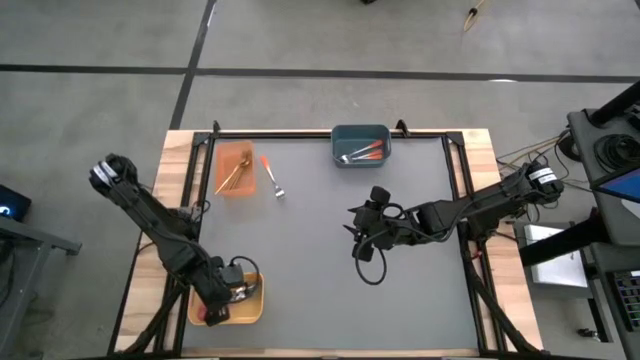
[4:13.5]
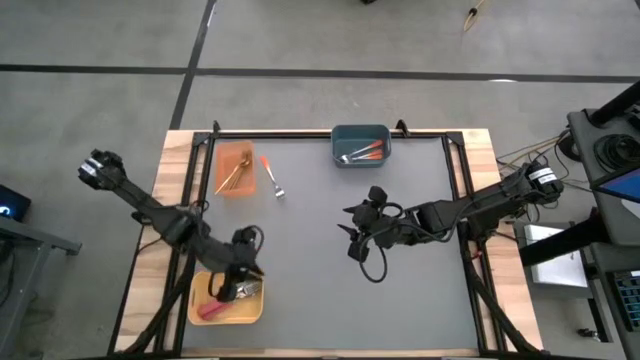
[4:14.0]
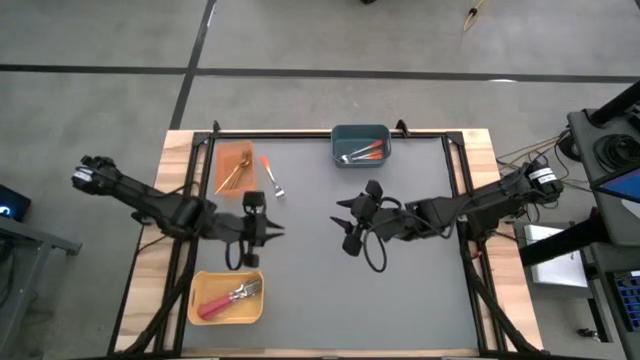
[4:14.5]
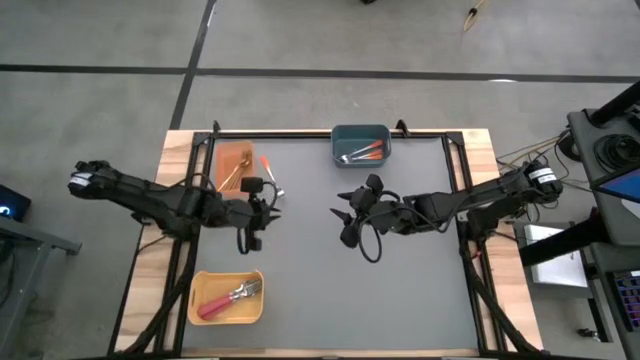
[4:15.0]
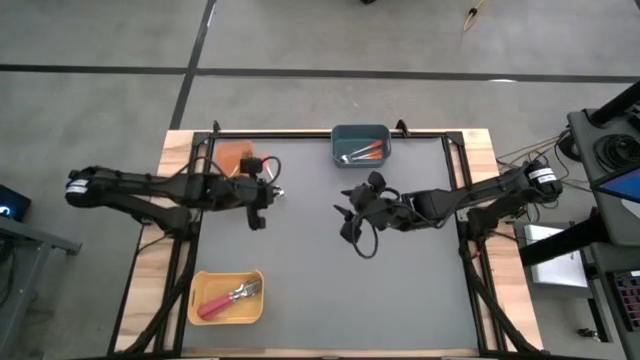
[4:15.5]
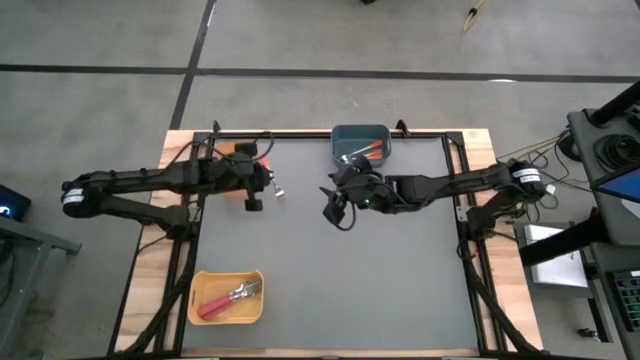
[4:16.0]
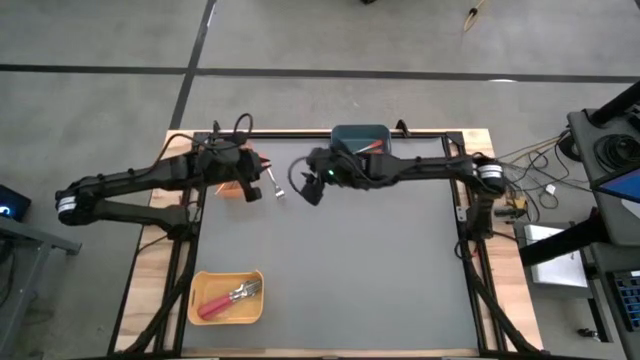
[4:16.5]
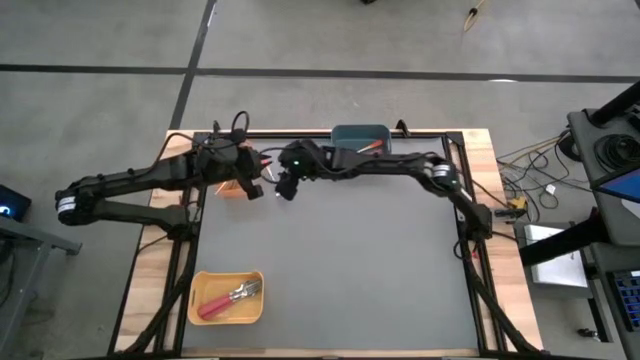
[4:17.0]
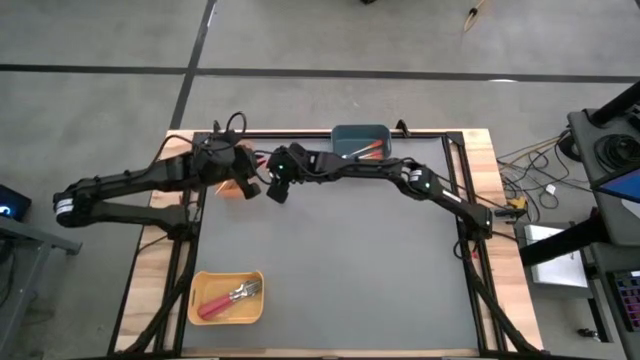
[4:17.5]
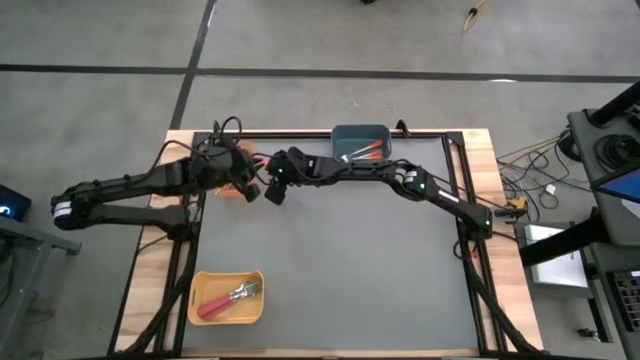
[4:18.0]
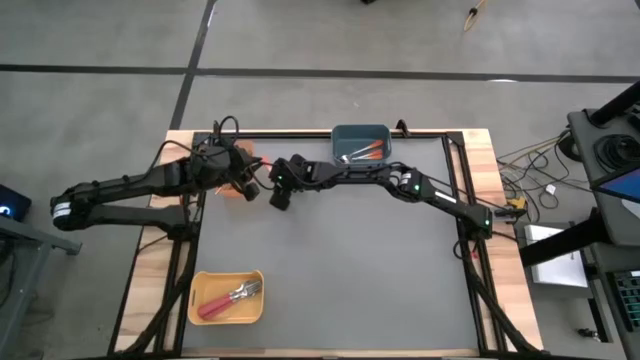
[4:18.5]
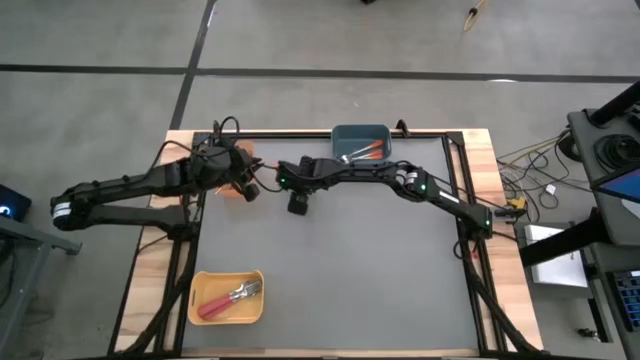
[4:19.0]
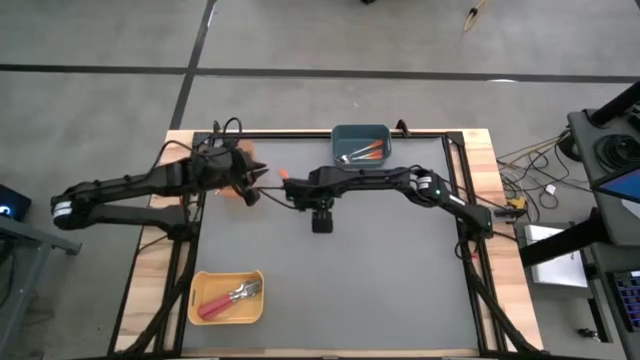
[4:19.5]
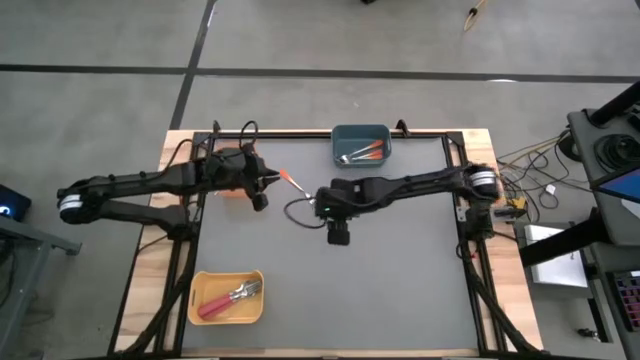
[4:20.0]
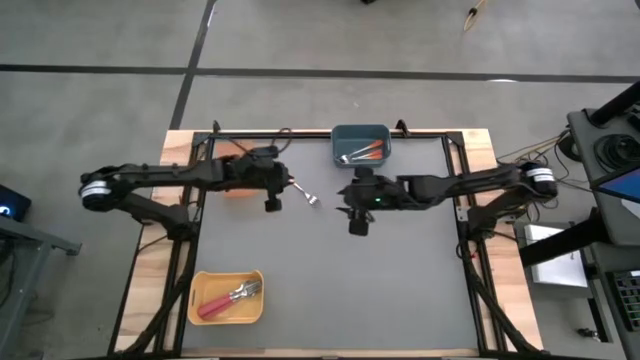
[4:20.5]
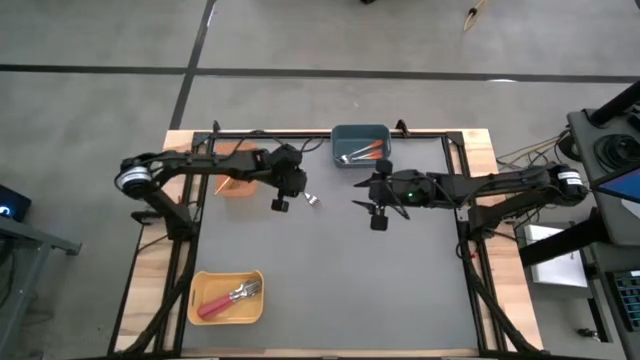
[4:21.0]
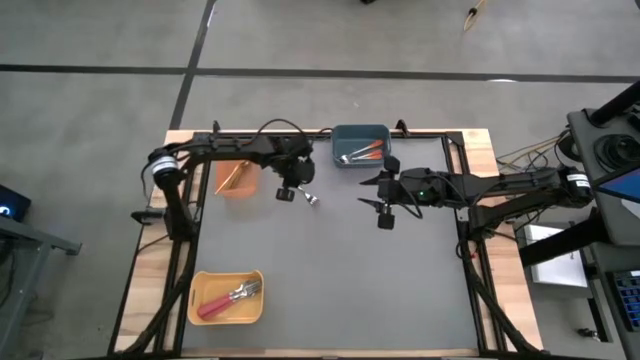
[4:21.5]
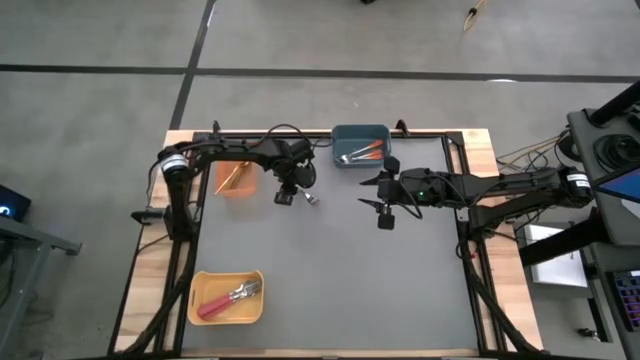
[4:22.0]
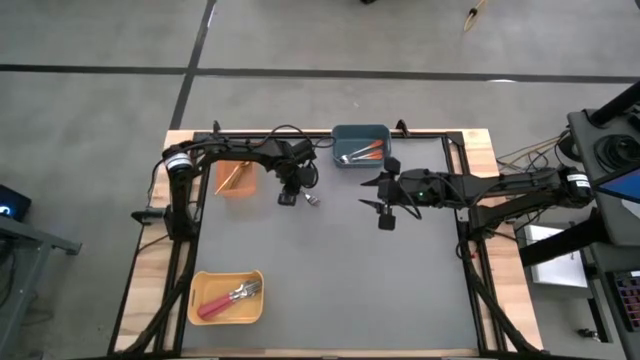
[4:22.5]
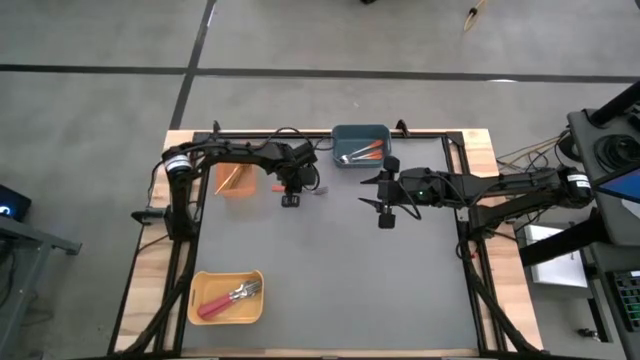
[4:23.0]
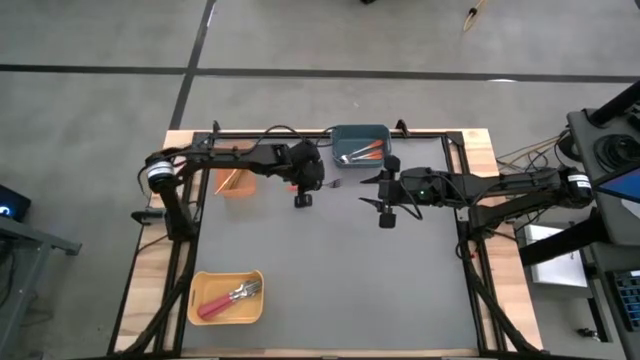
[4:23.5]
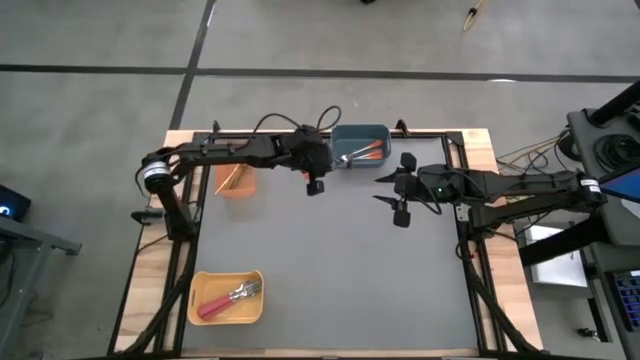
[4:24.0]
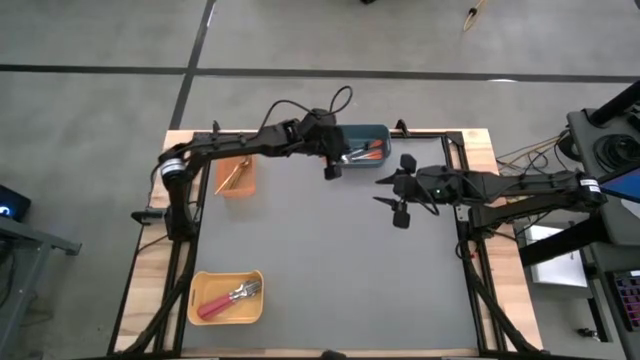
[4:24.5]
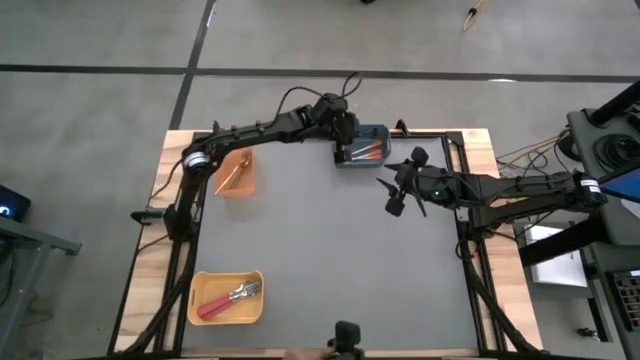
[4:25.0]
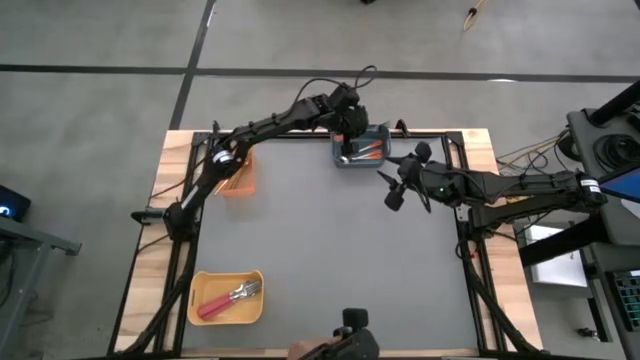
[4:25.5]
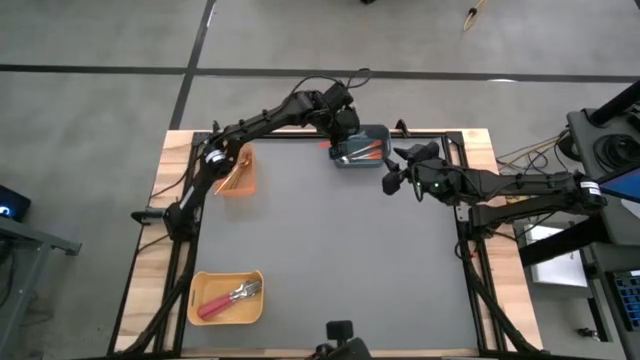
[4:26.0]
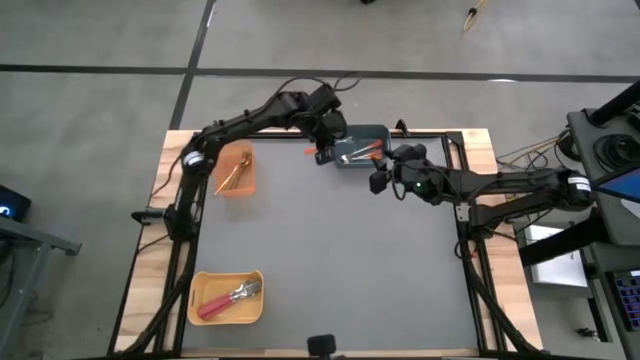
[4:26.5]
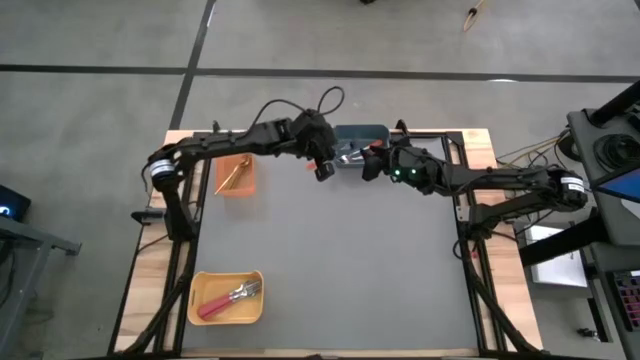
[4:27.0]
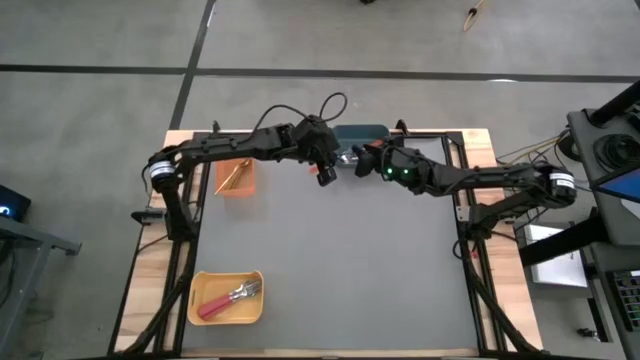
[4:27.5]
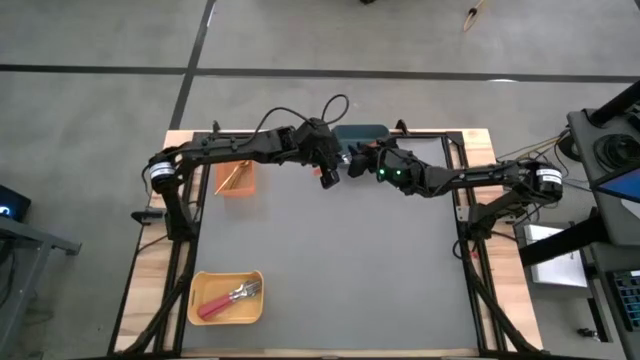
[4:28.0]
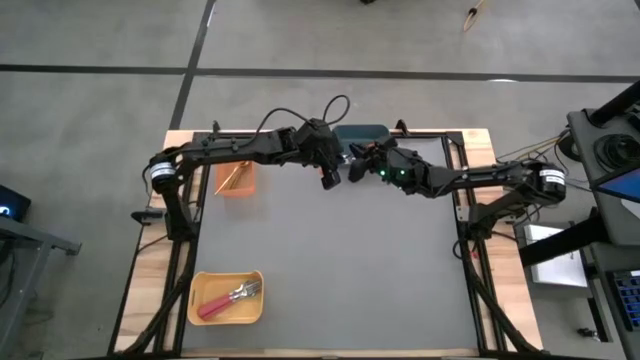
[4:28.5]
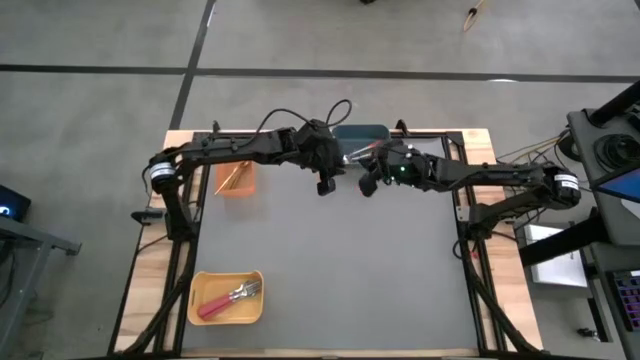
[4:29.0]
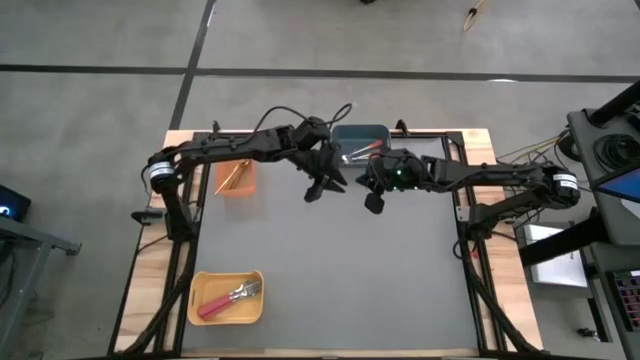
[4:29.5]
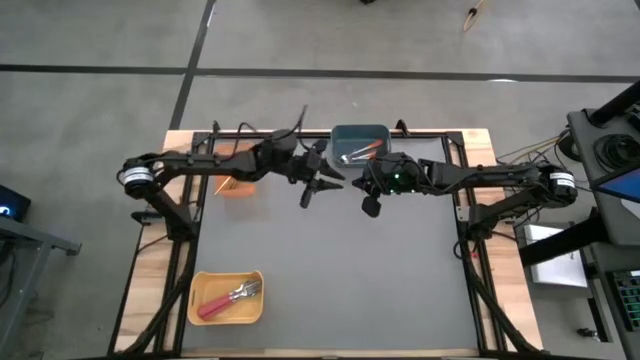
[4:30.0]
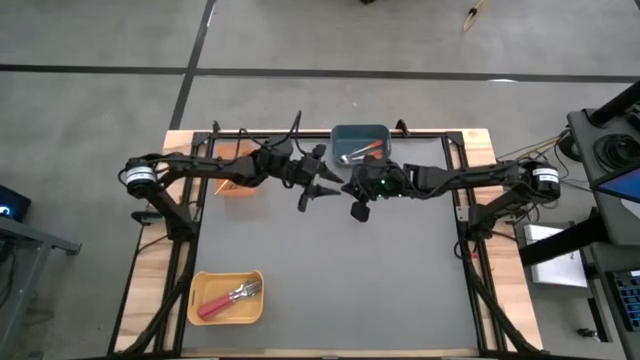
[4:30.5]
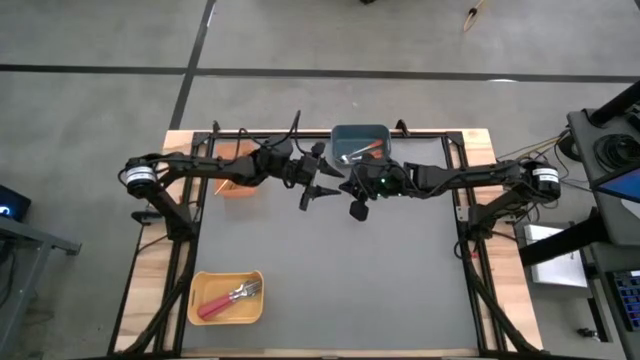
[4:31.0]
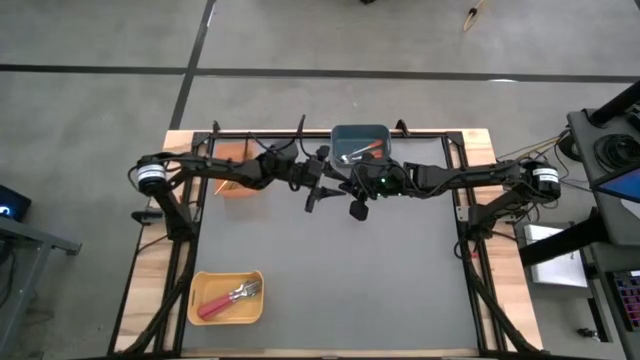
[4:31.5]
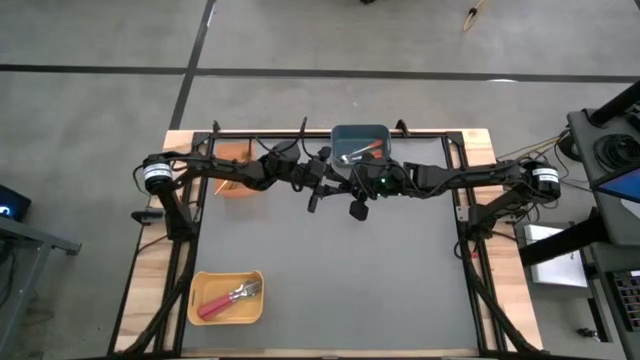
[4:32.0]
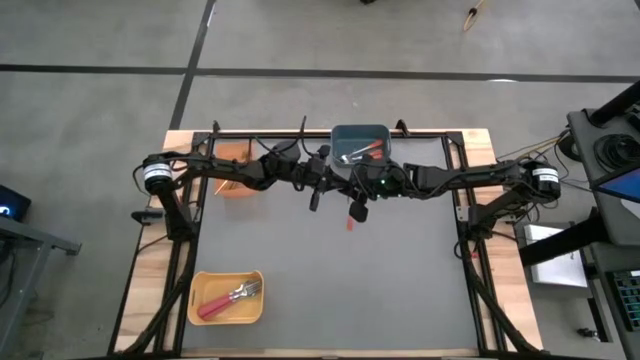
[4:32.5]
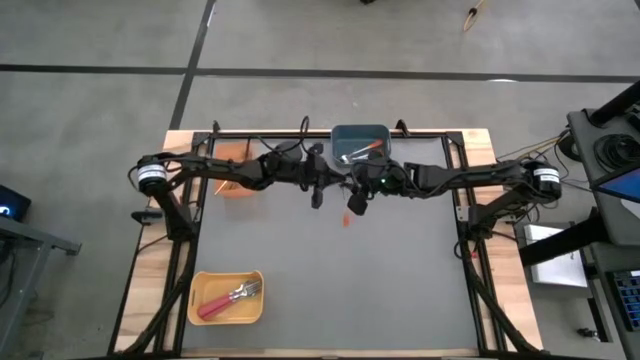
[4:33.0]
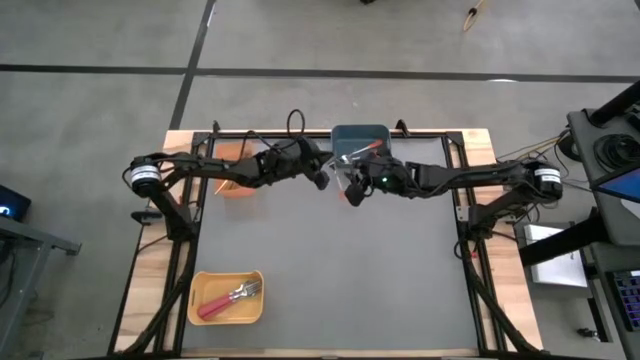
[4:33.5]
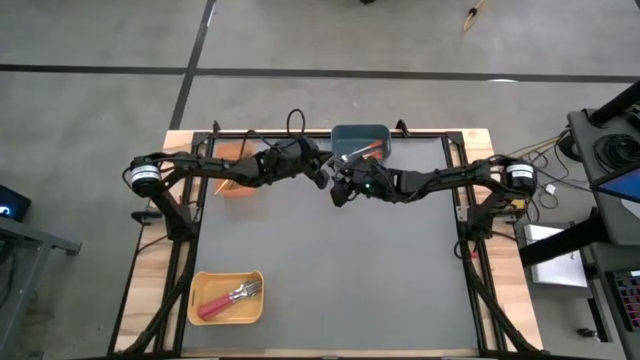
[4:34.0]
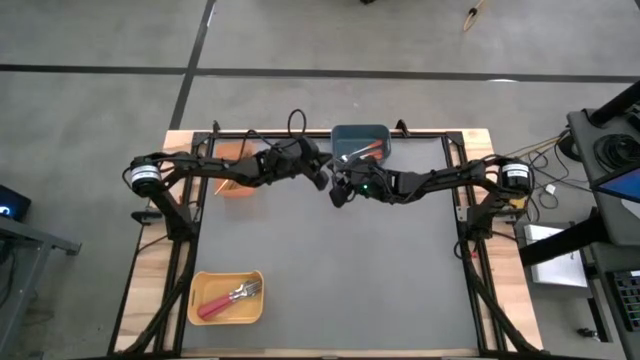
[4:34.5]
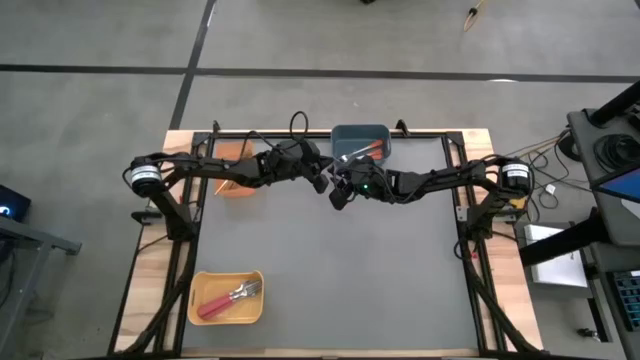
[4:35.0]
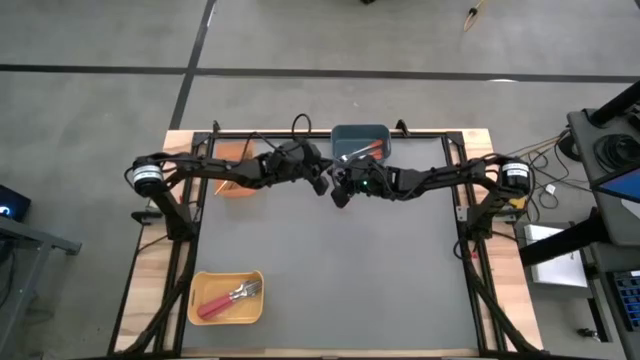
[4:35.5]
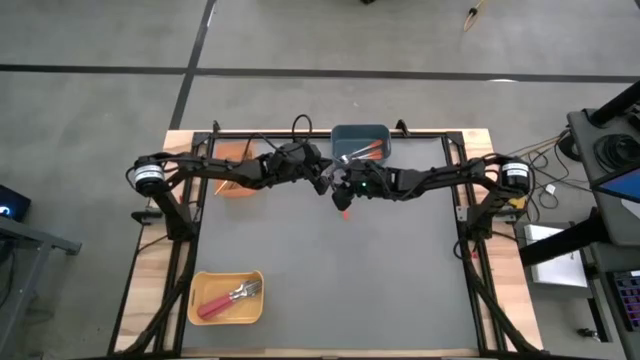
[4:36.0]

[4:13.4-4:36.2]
Task: Sort silverware by color (type)
Put the orange fork into the blue bin
